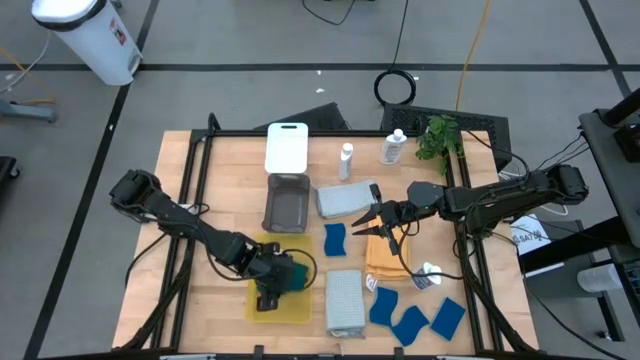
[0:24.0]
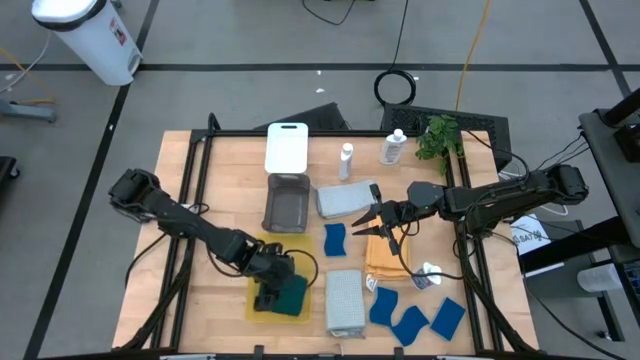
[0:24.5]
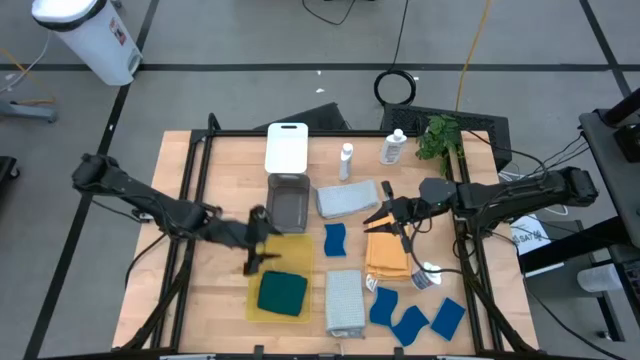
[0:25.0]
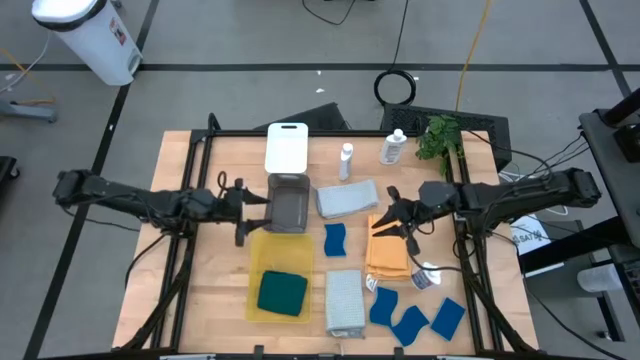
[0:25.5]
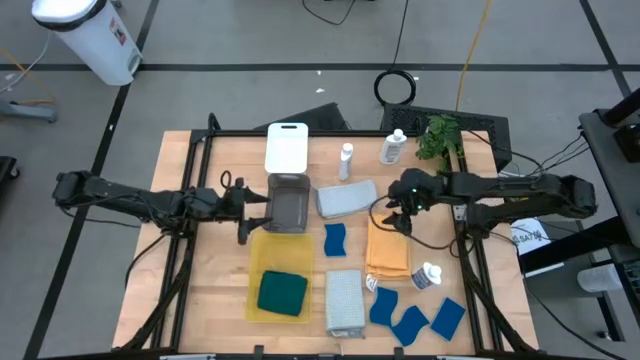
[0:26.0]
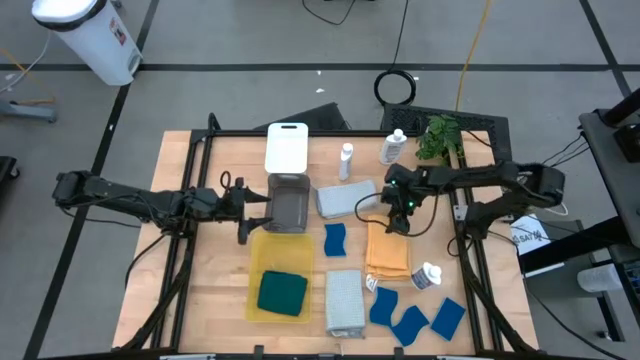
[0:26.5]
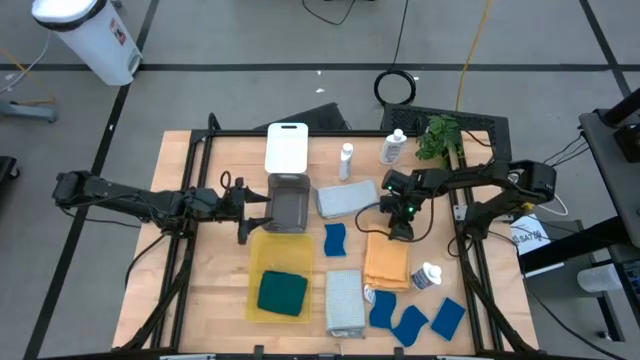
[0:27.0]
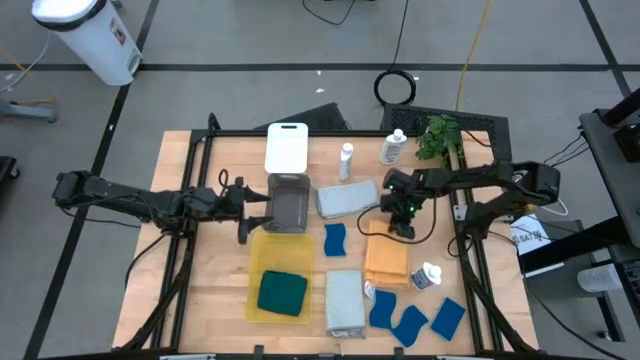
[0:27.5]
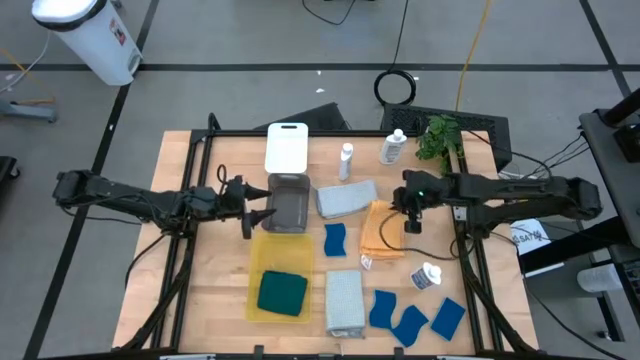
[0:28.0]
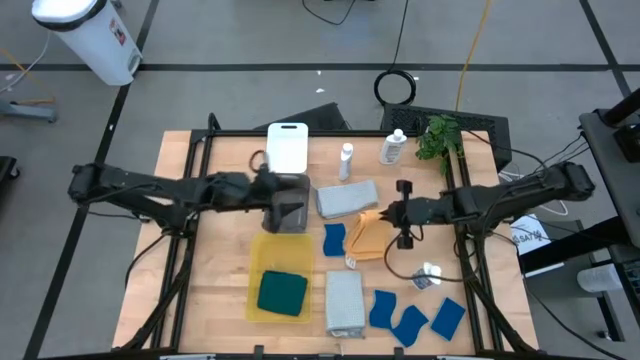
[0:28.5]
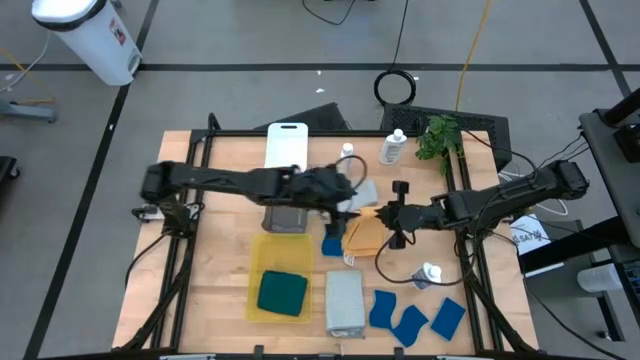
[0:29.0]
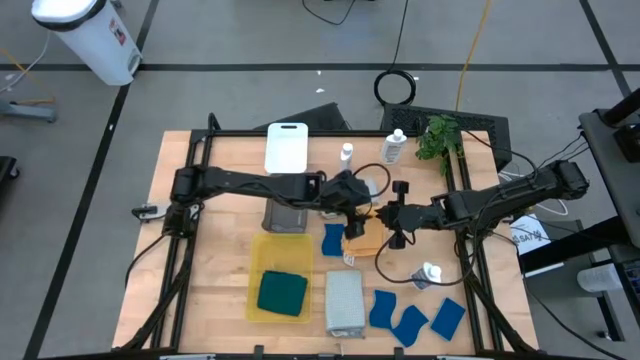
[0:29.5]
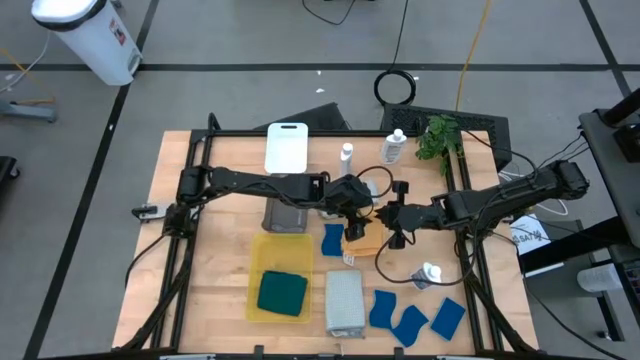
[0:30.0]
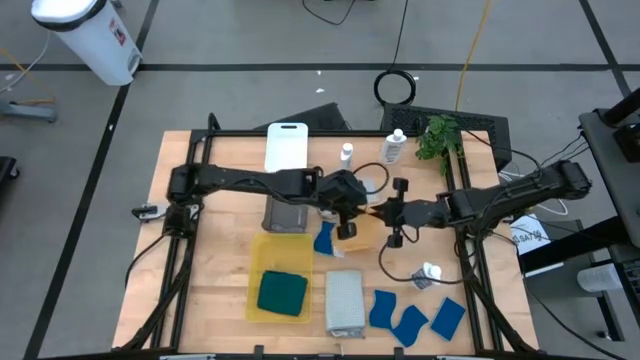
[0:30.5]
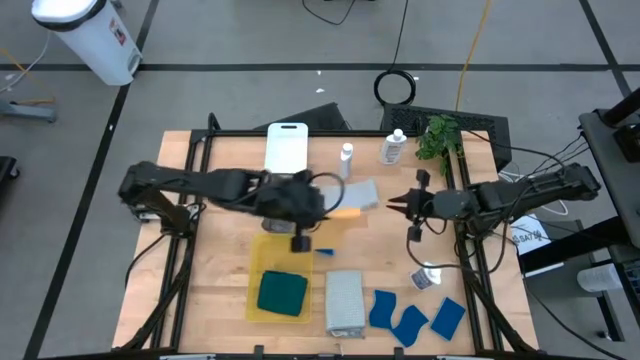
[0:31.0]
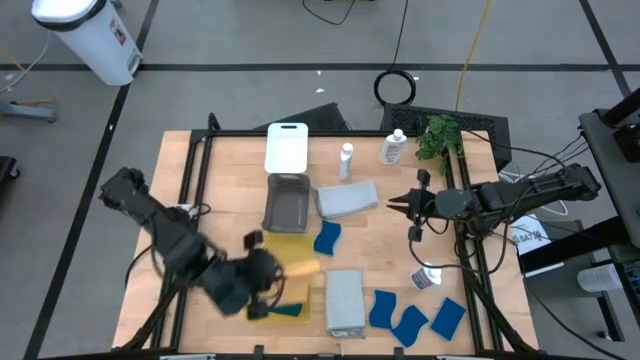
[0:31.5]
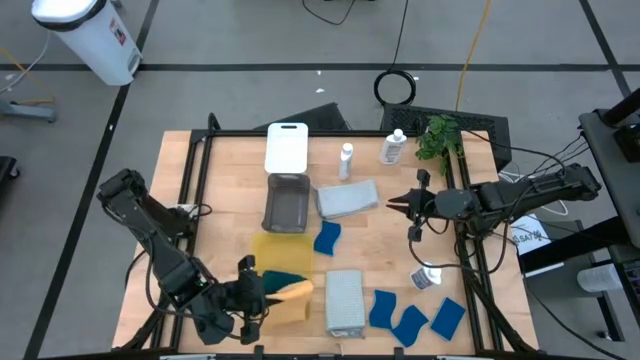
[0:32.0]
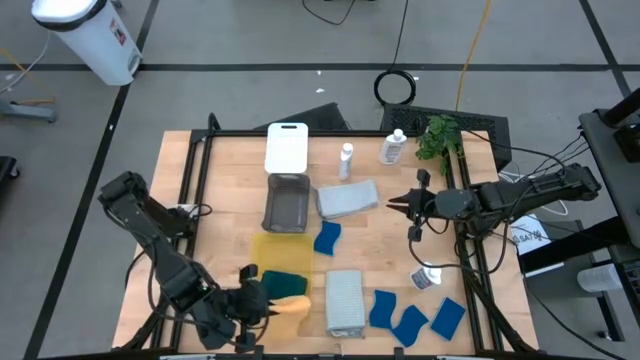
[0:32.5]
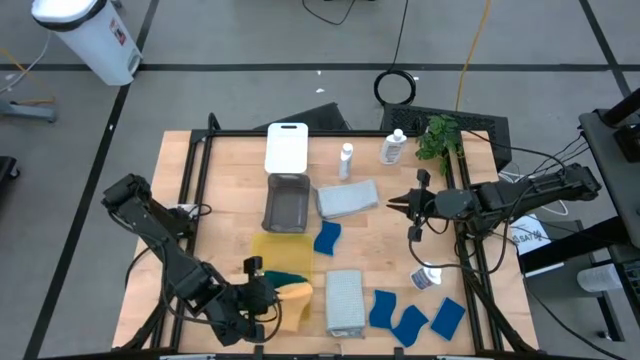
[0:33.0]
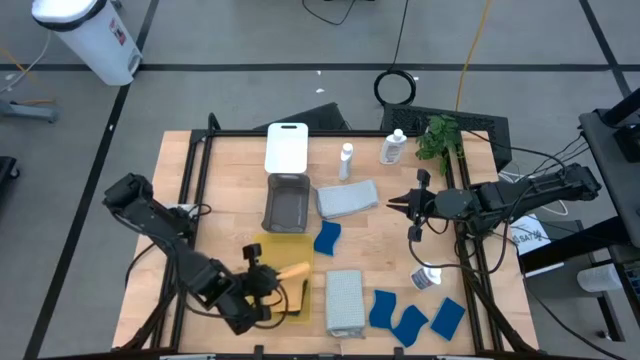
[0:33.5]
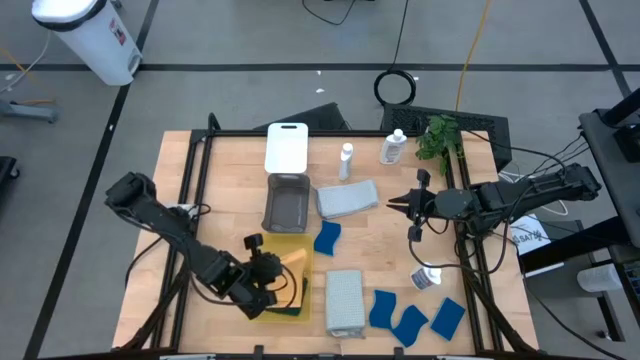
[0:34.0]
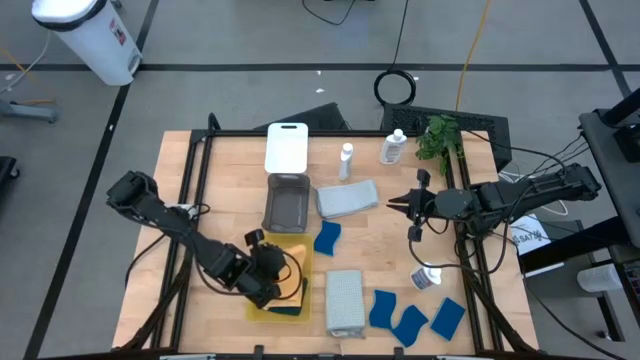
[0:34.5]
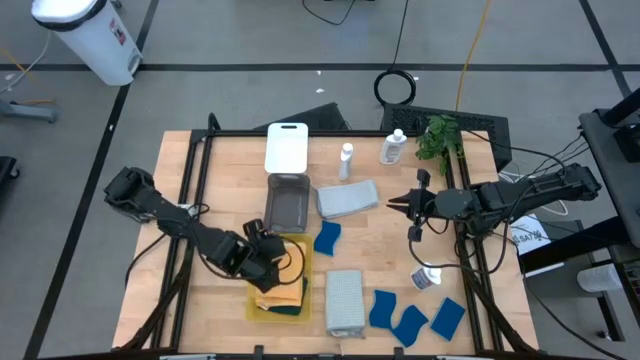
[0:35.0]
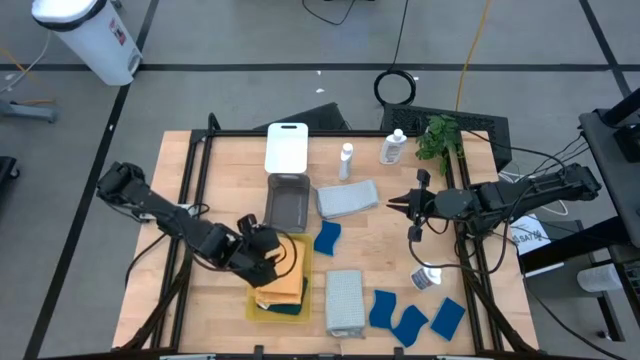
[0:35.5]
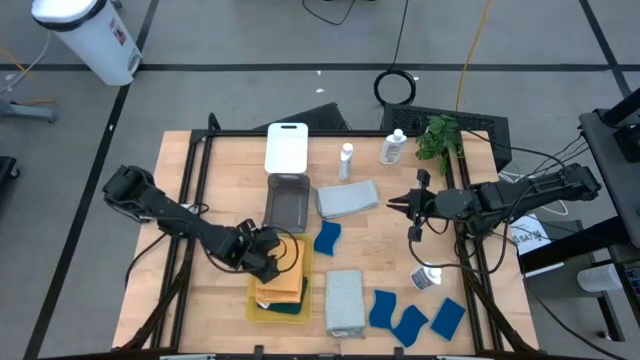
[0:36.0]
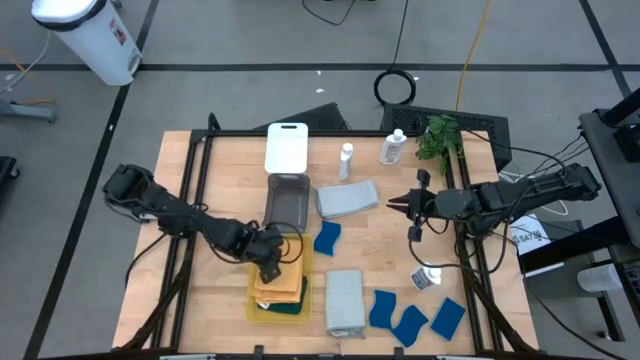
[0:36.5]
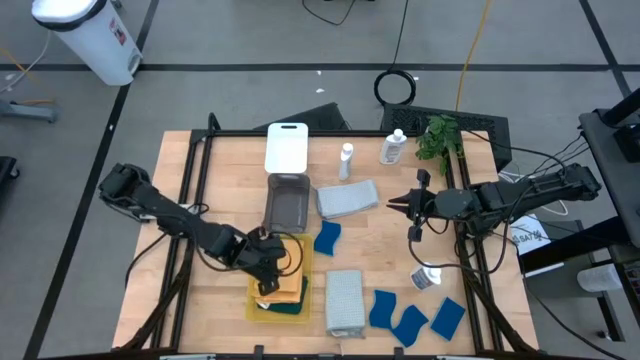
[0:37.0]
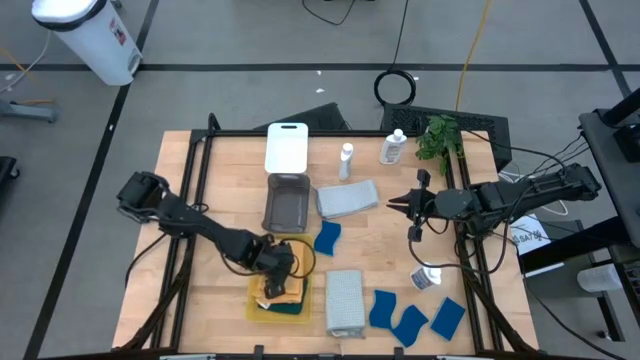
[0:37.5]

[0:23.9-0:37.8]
Task: Pick & Place Kitchen Items
Put the yellow towel into the yellow bin

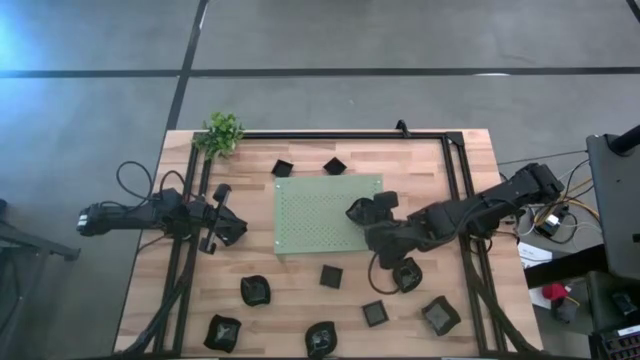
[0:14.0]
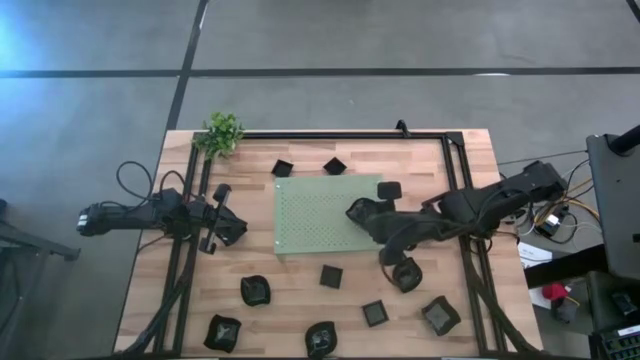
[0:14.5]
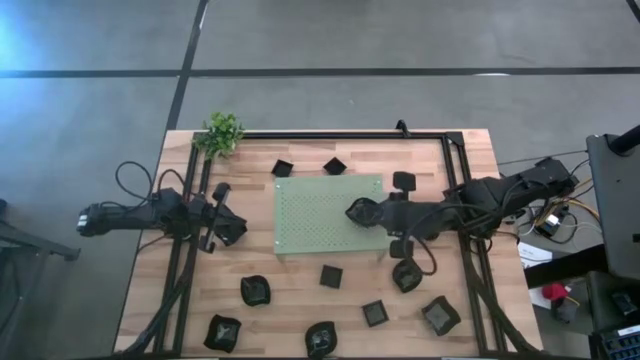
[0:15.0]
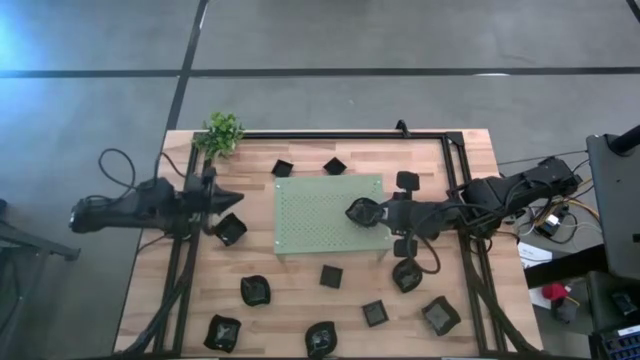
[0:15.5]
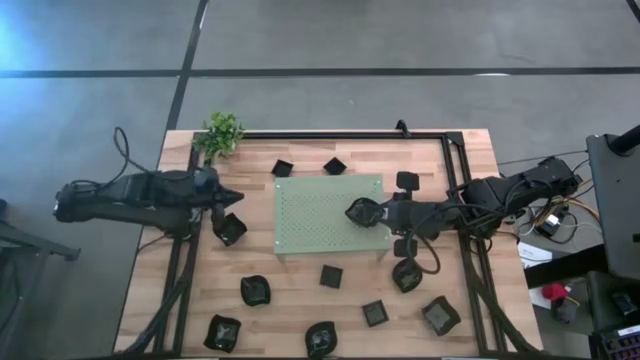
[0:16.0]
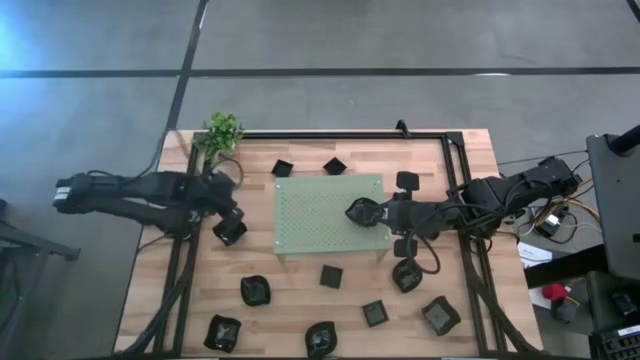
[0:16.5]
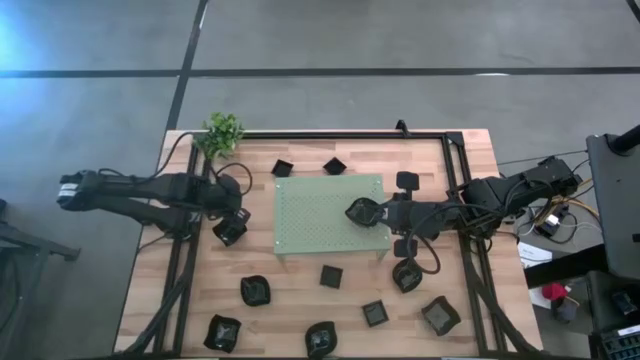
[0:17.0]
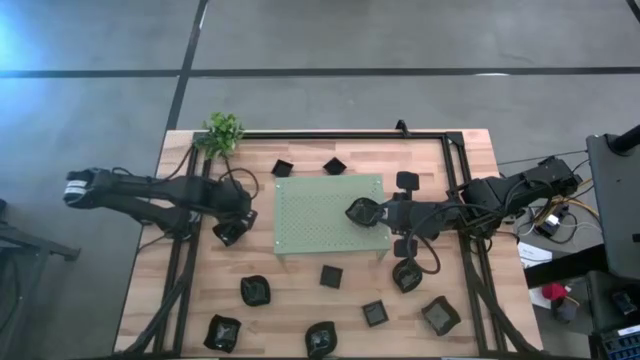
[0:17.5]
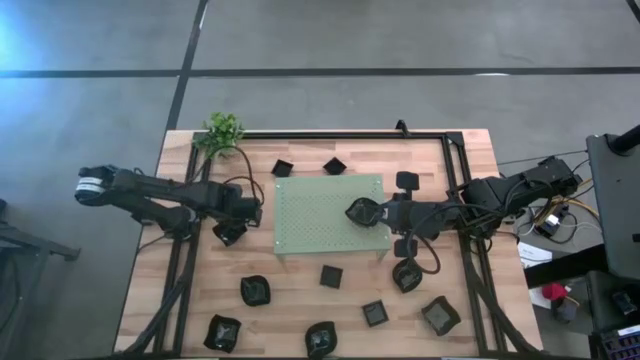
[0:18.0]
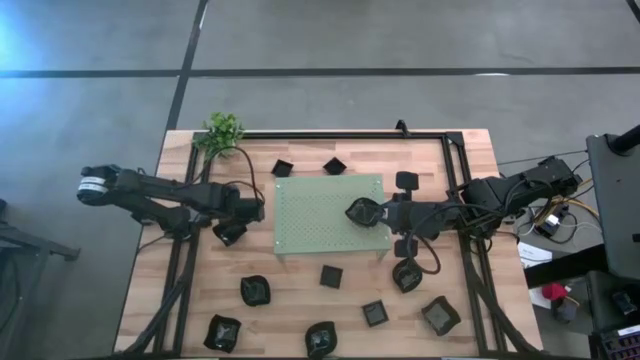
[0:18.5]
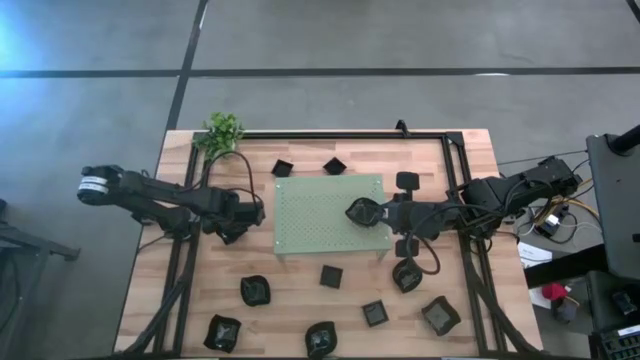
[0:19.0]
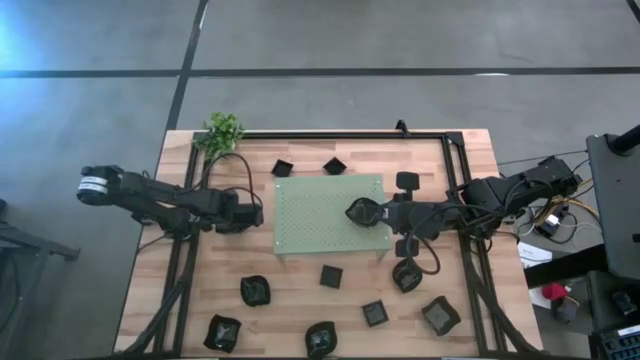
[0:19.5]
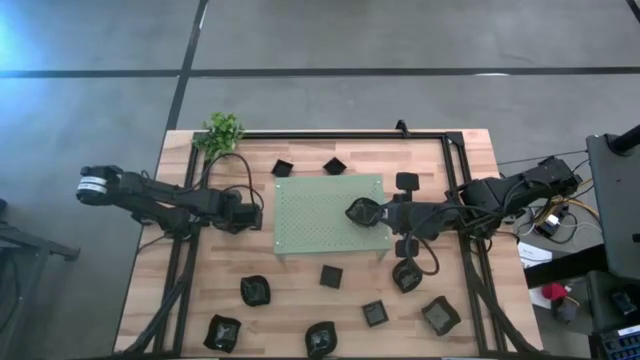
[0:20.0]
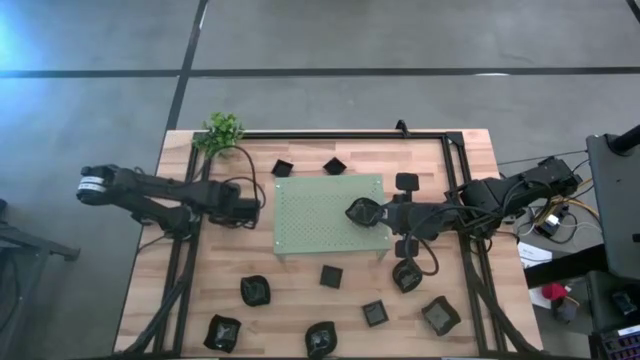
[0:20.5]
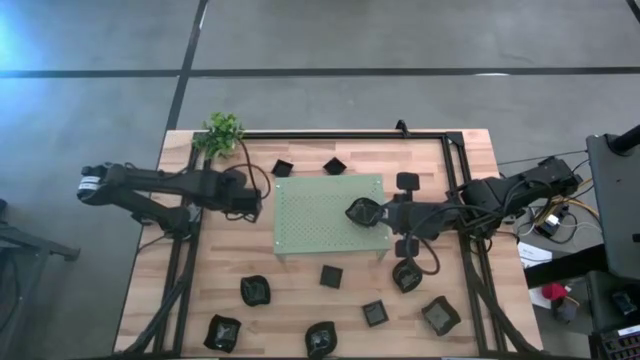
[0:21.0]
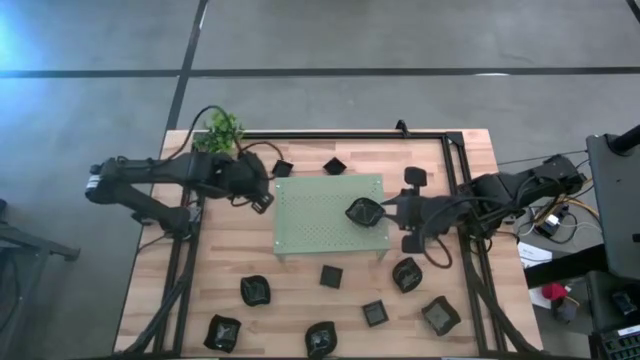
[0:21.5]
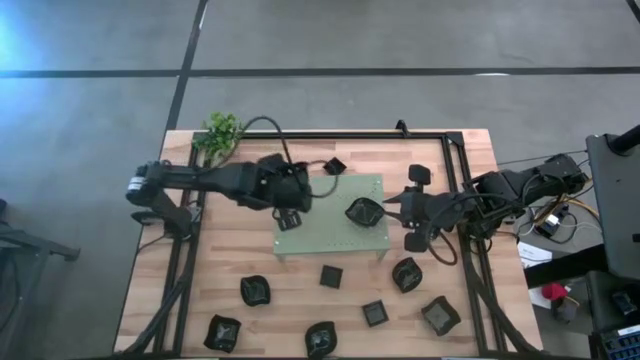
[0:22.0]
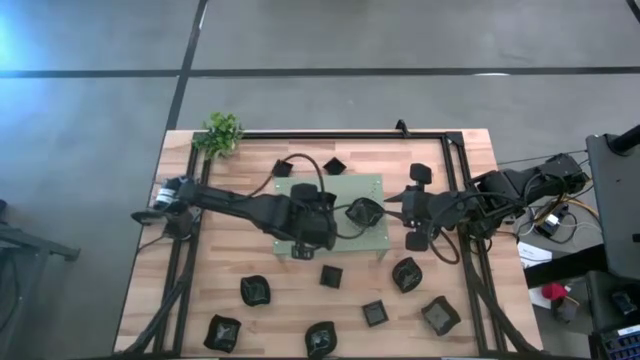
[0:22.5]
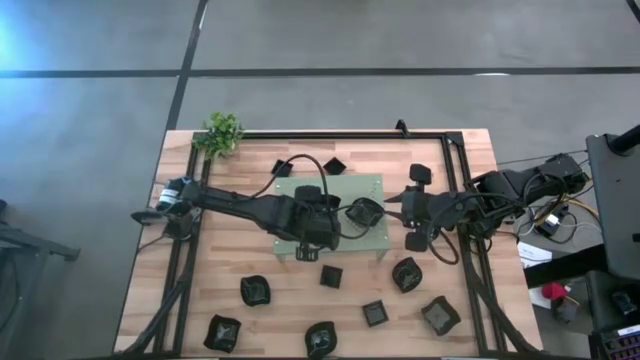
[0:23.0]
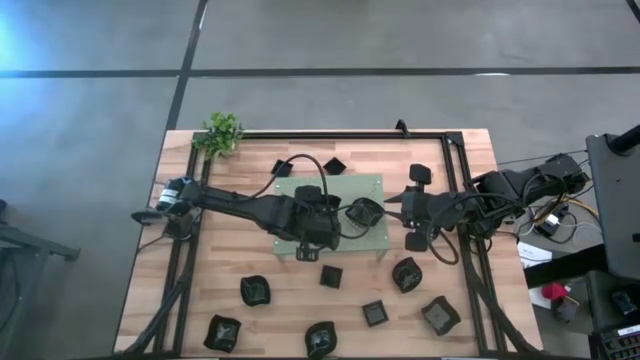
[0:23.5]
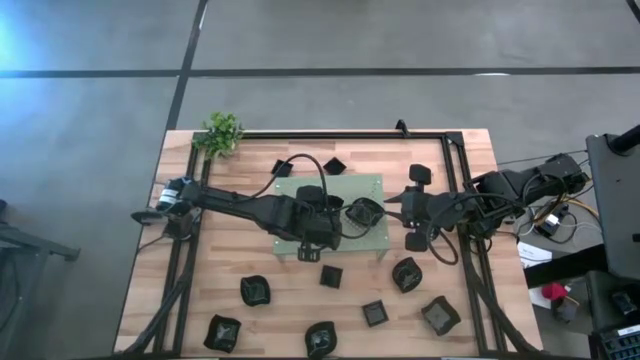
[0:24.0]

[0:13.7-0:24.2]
Task: Pick & Place Mini shaped plates
Put the distorted square plate on the shelf
